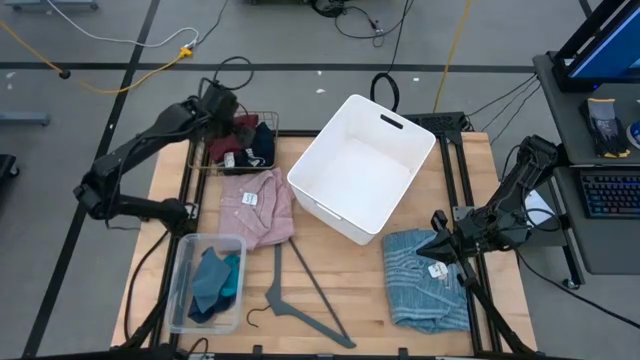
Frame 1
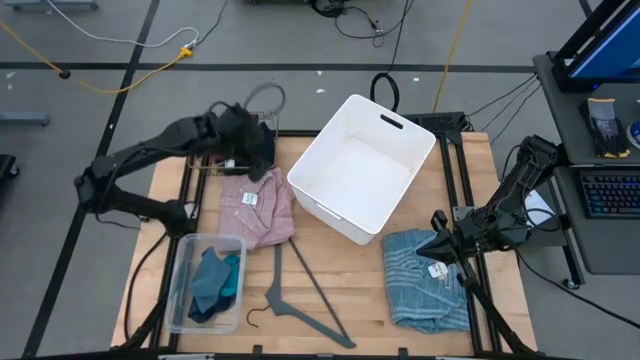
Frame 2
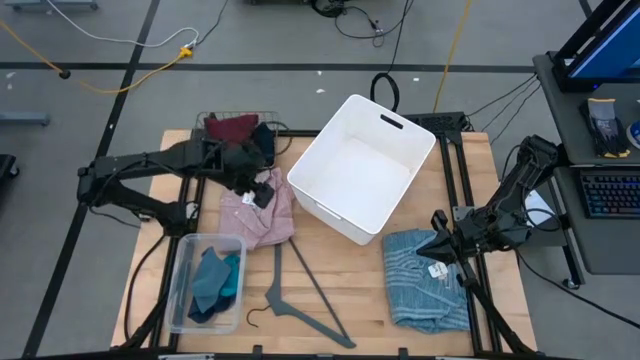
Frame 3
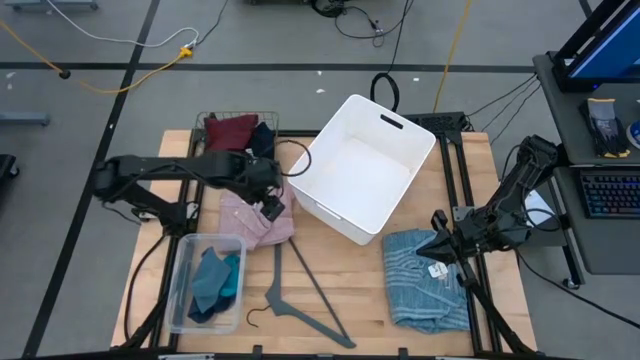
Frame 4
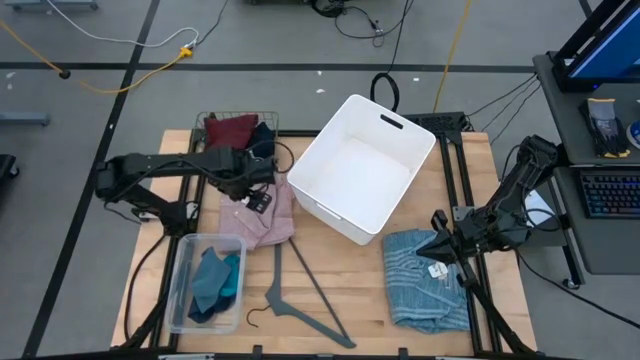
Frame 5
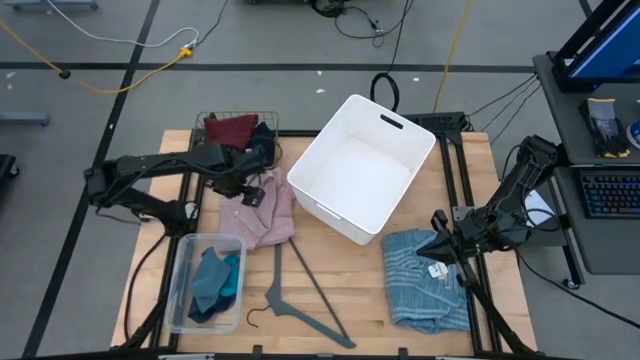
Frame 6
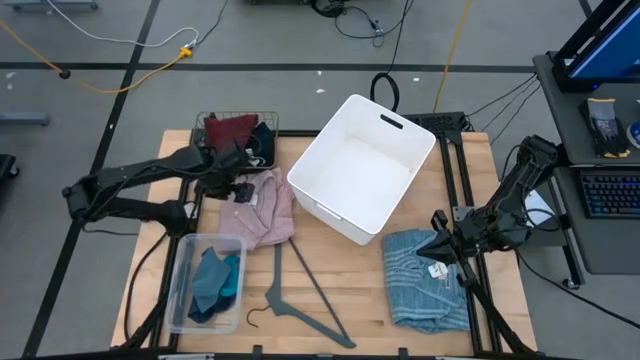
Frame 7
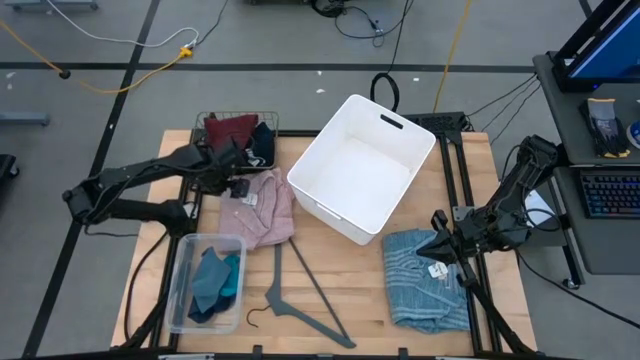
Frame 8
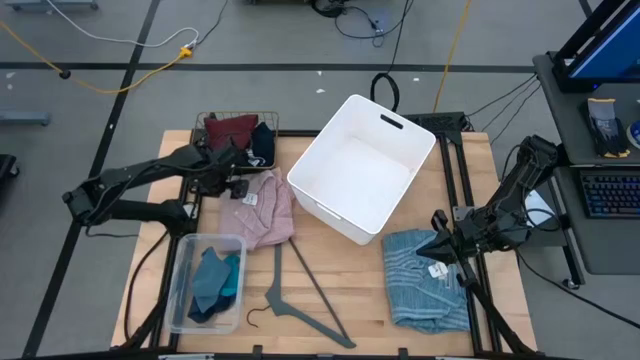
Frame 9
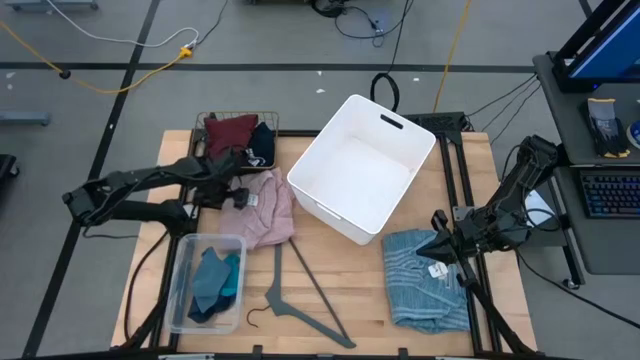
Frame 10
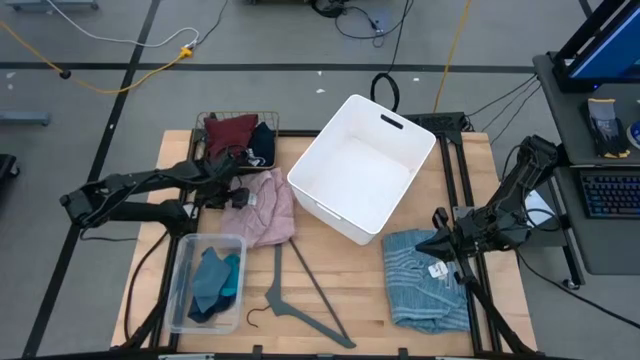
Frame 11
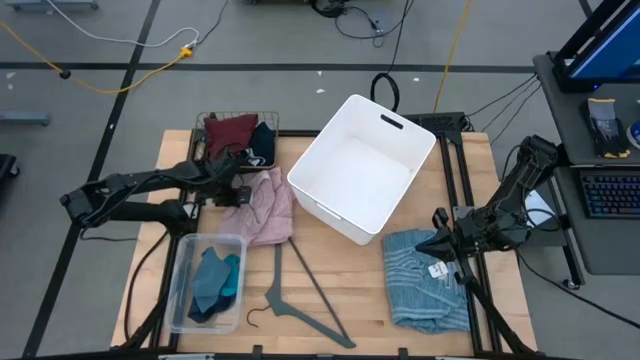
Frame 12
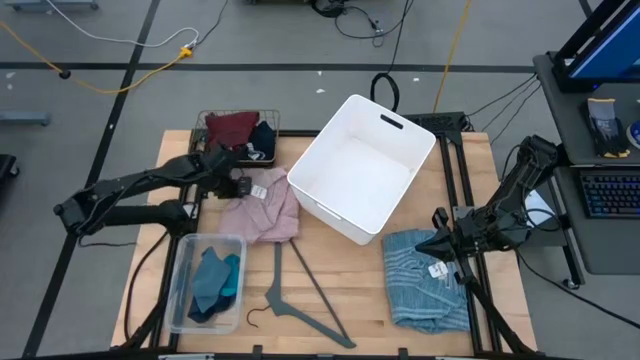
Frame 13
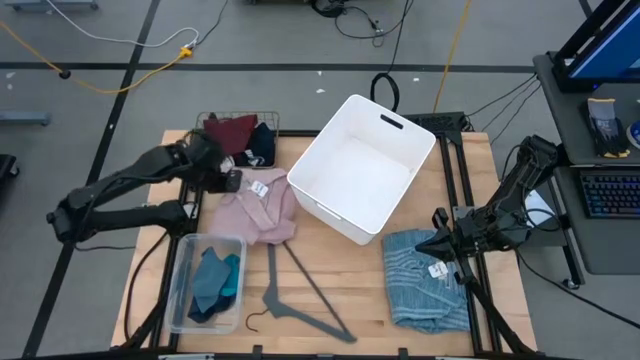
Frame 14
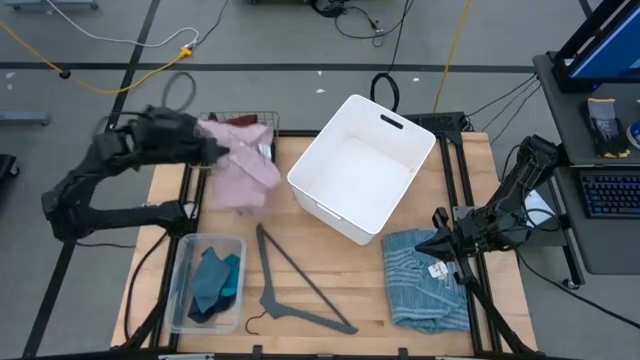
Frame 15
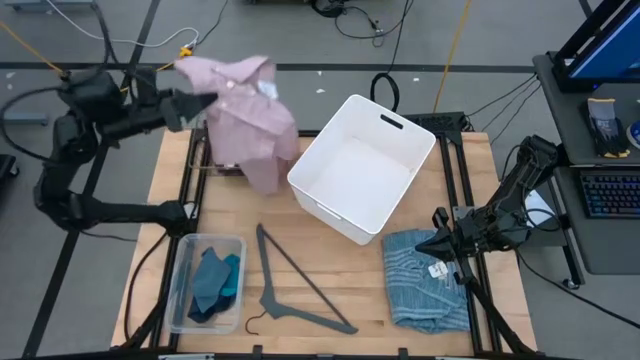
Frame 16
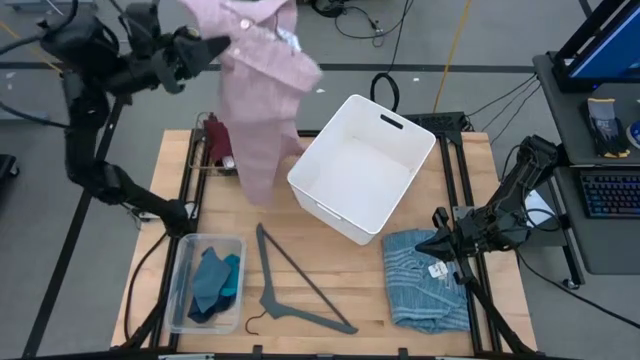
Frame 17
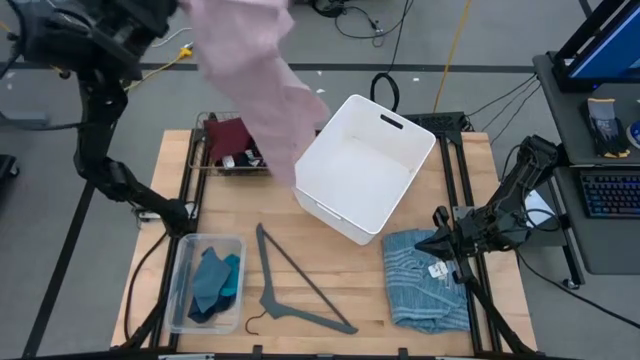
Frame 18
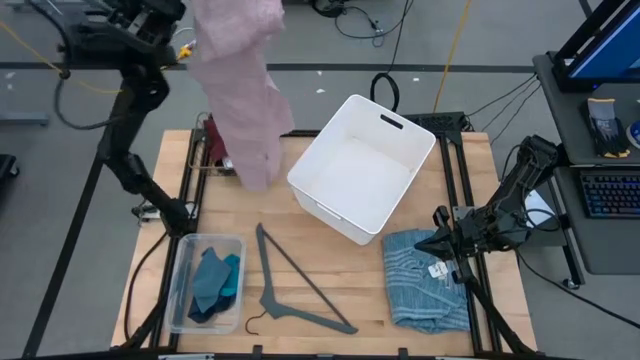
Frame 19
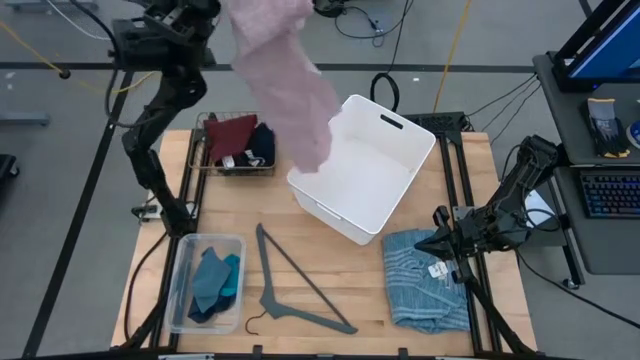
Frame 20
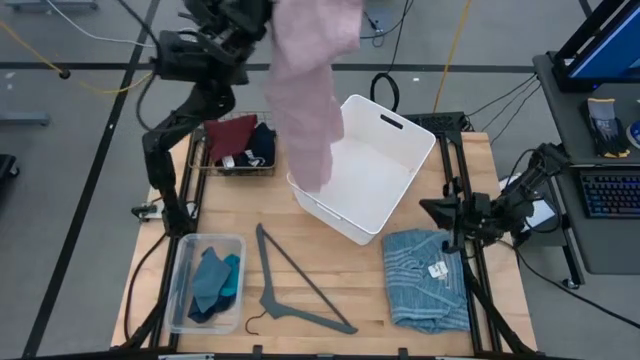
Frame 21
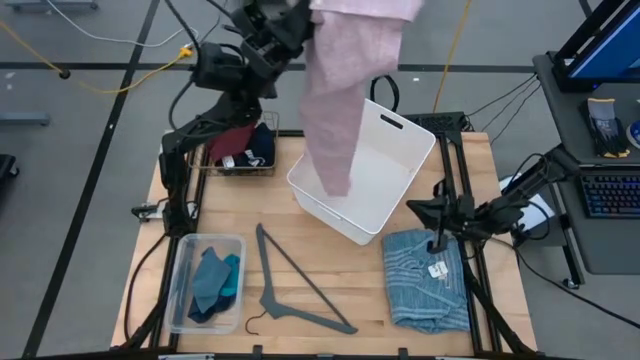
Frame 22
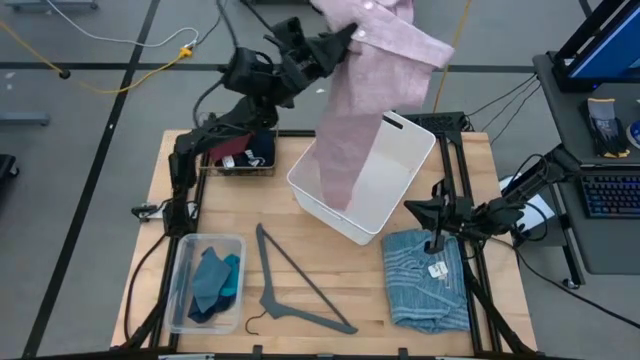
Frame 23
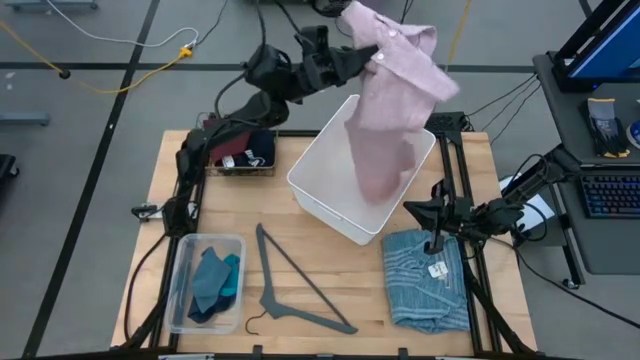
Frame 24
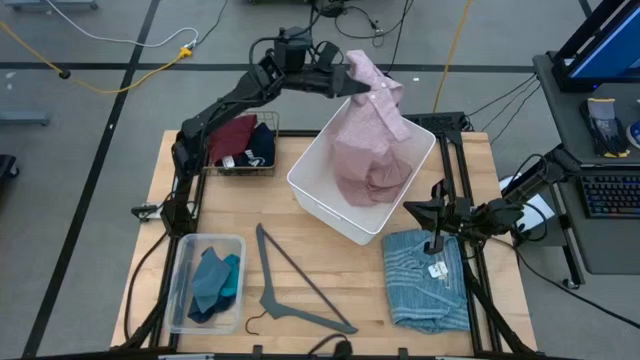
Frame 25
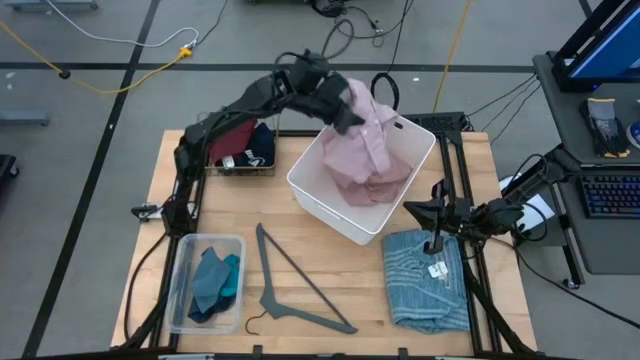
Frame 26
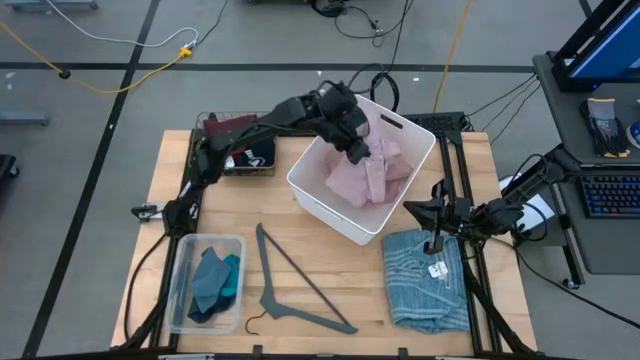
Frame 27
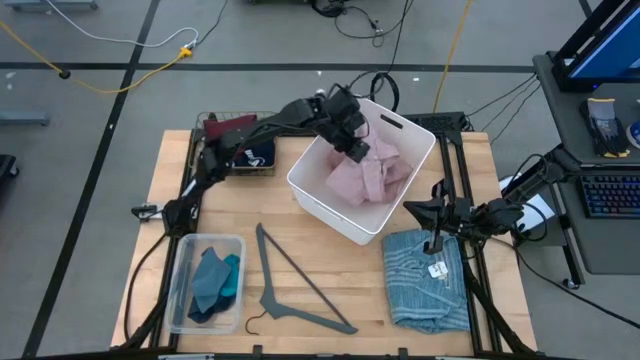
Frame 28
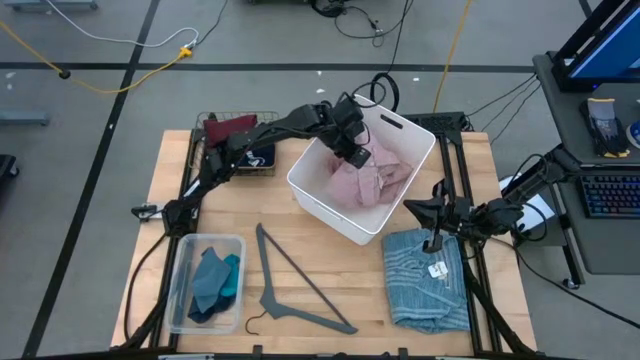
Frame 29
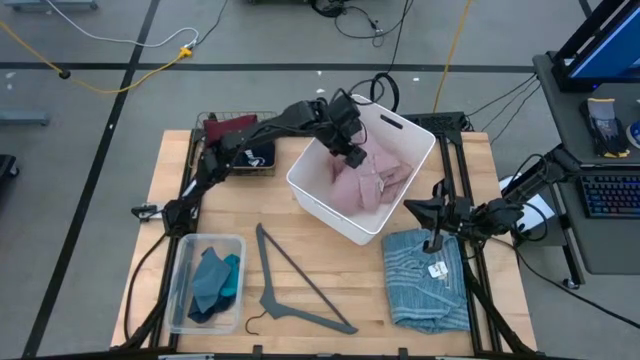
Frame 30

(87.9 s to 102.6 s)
Task: Pick & Place Cloths
Put the pink polo shirt into the white bin

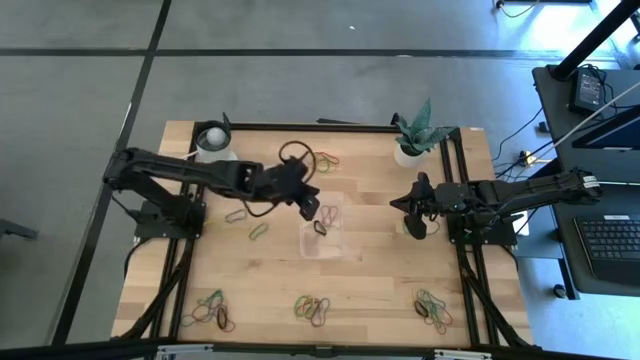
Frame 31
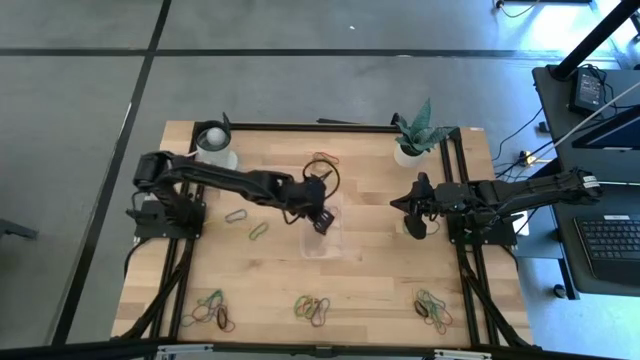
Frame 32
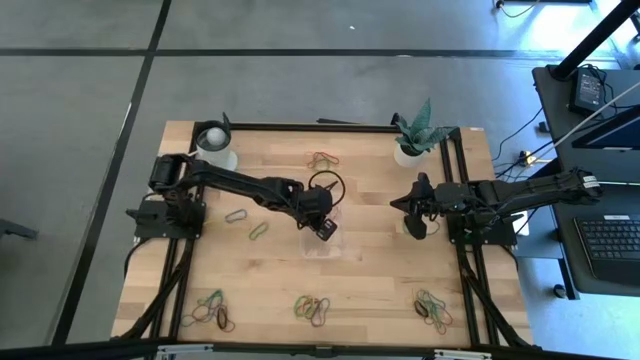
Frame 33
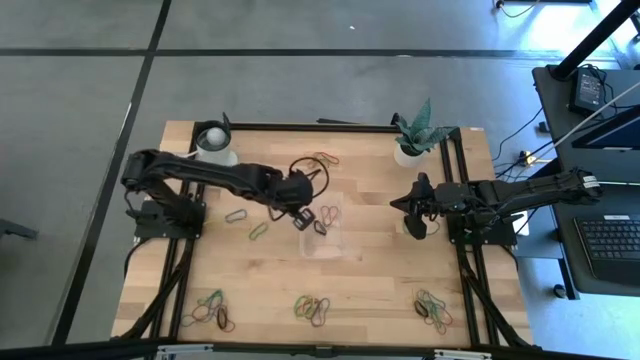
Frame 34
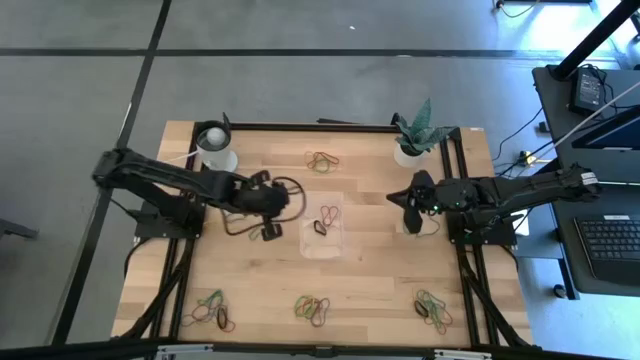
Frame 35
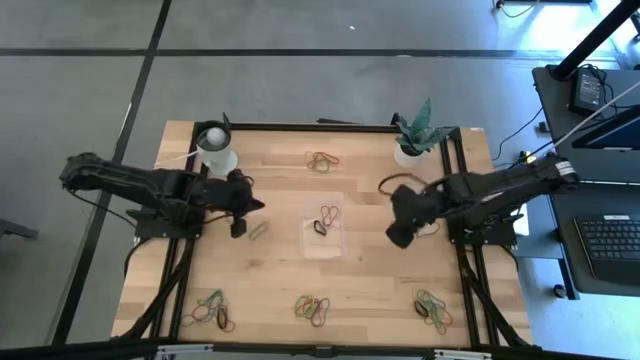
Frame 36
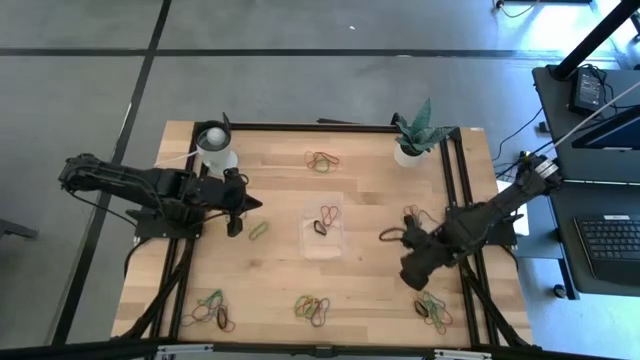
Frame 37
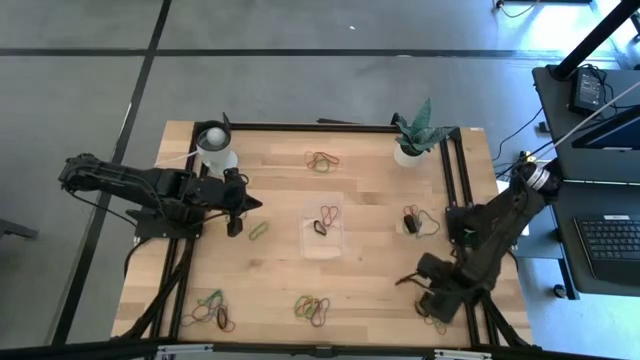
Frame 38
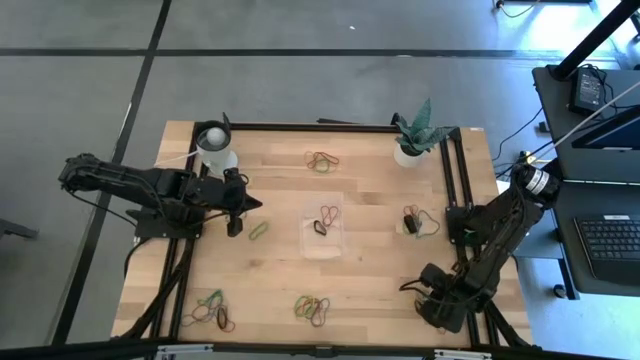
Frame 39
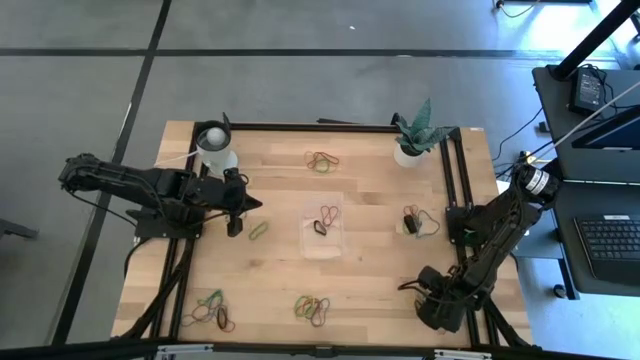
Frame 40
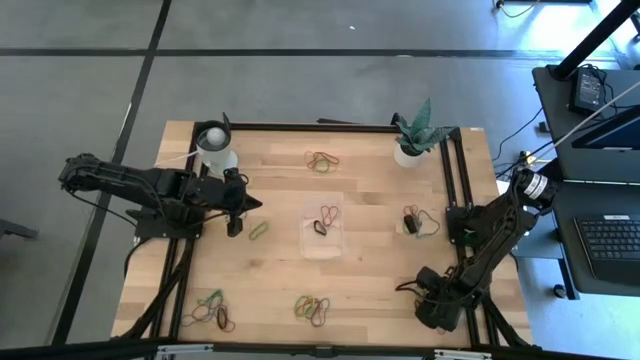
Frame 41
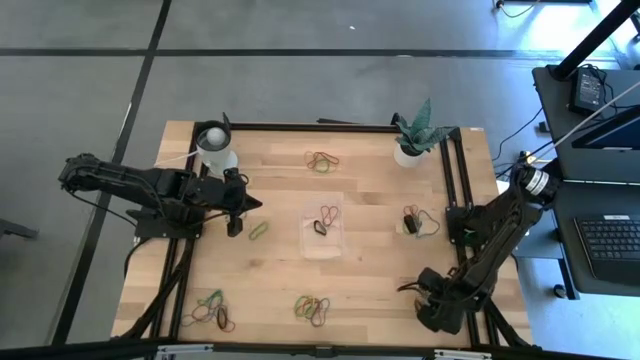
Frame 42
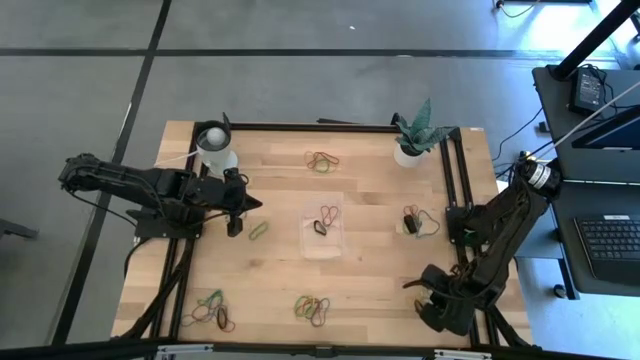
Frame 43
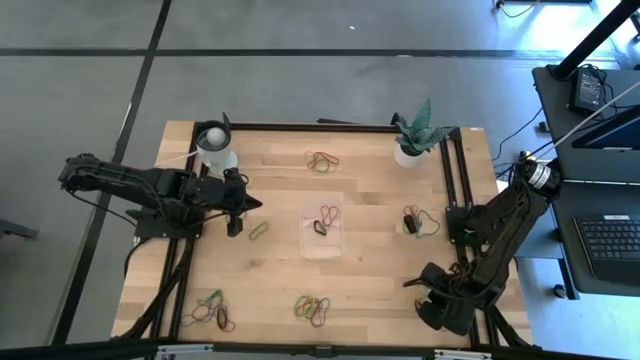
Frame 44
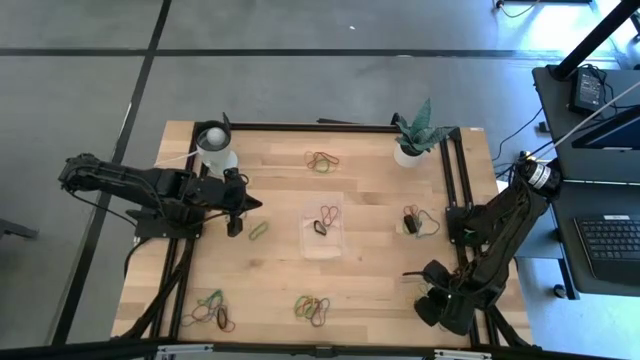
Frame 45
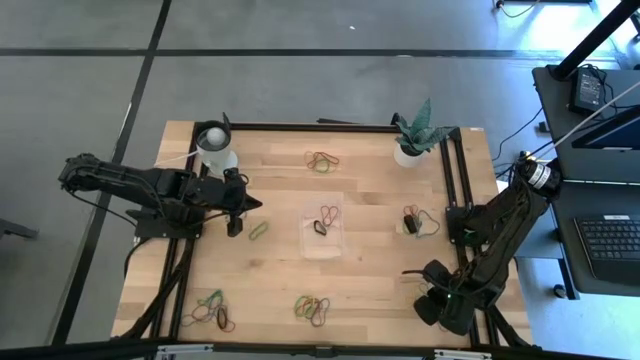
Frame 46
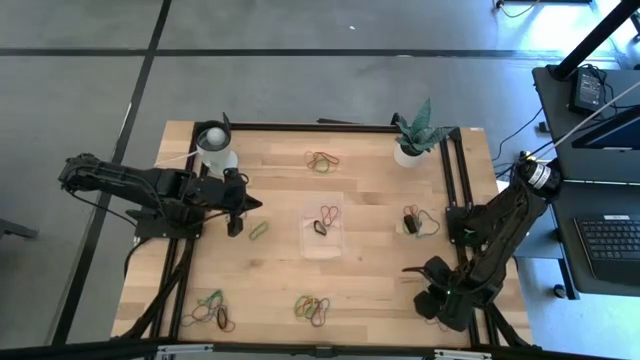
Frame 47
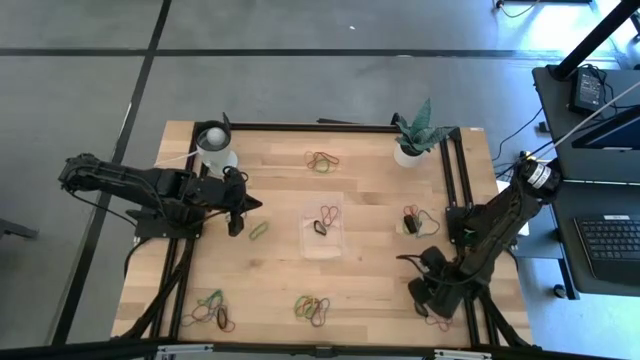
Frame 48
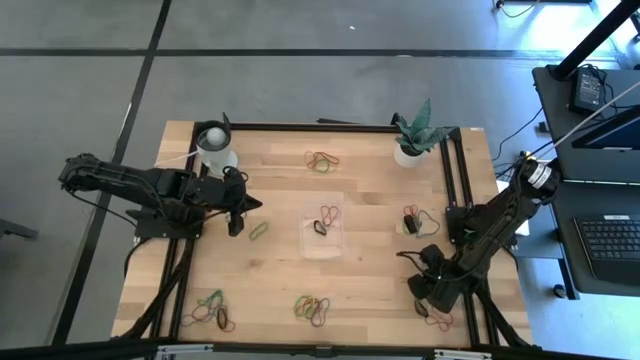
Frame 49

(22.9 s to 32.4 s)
Task: Pick and place rubber bands into bin
Put the blue rubber band into the transparent bin
